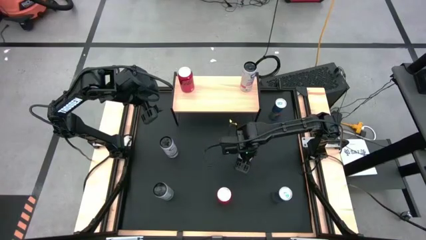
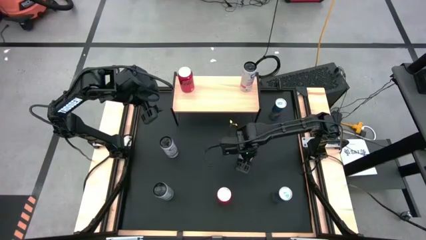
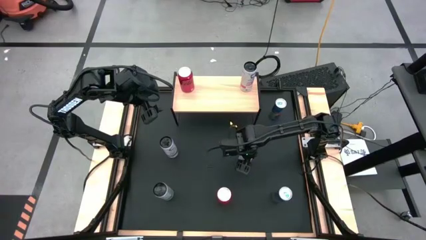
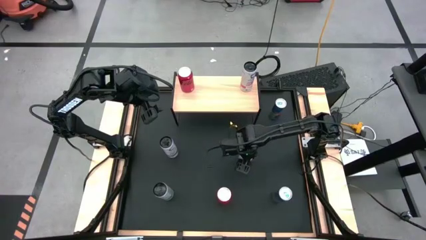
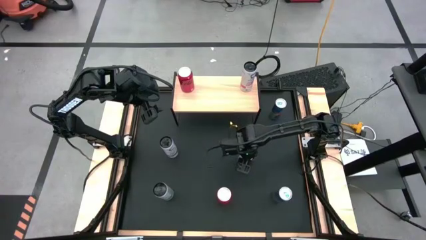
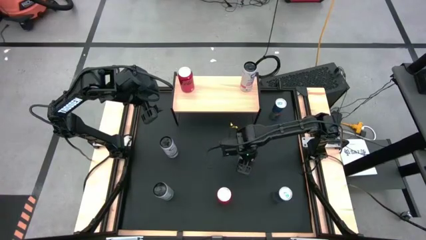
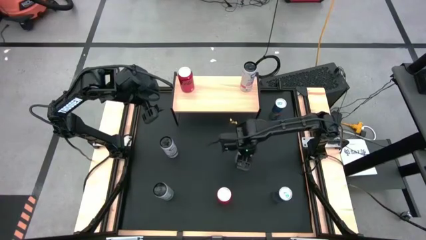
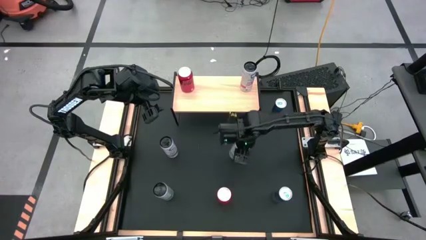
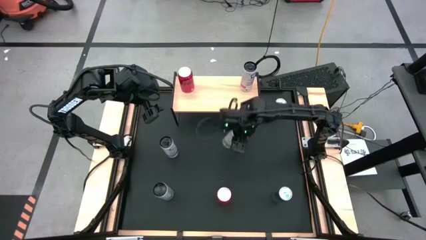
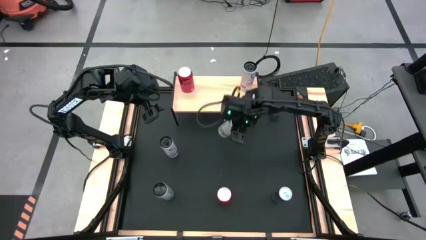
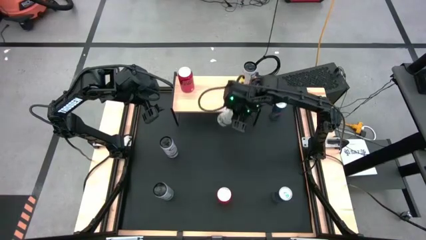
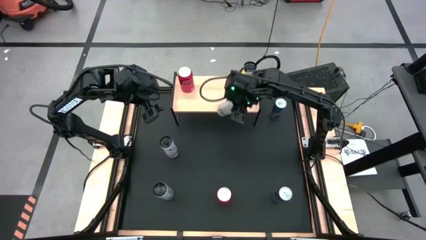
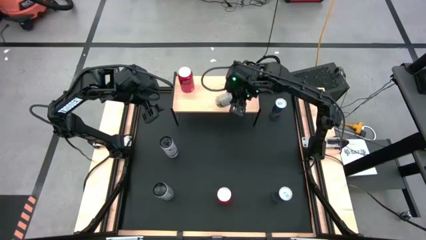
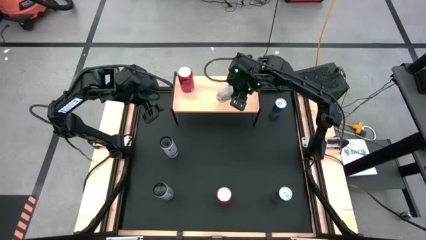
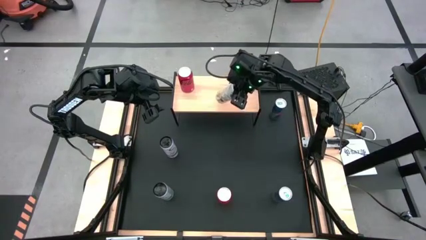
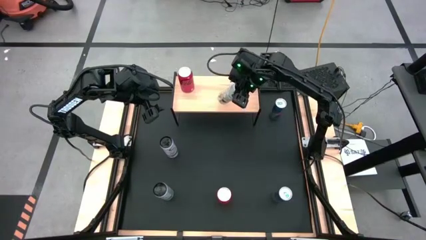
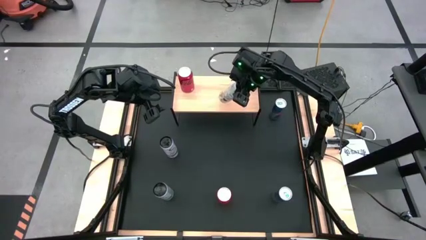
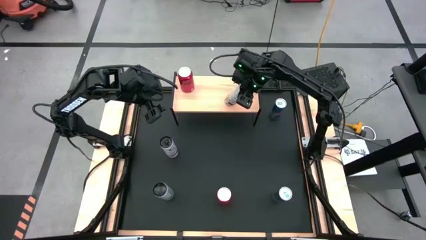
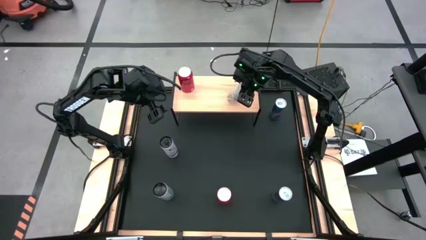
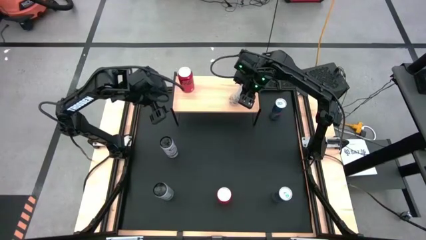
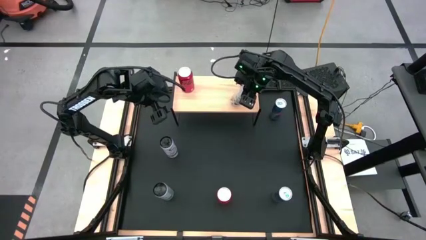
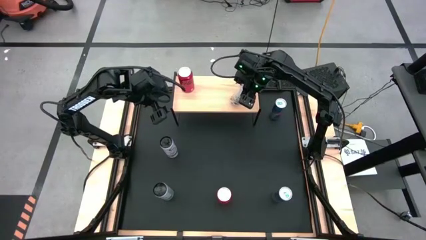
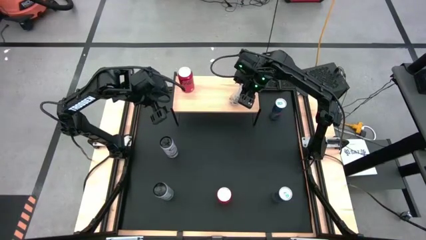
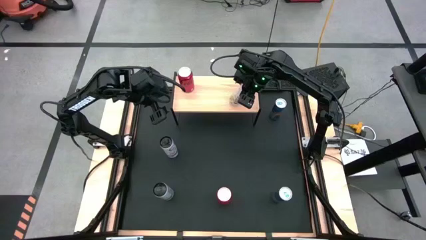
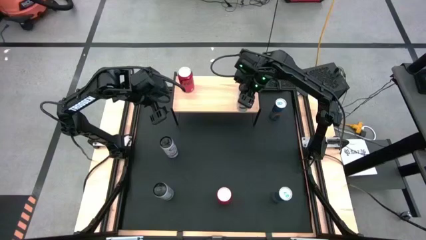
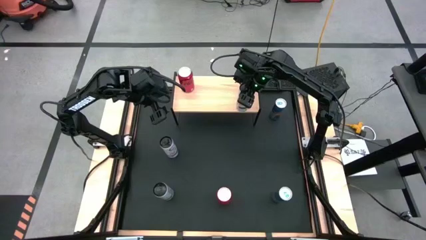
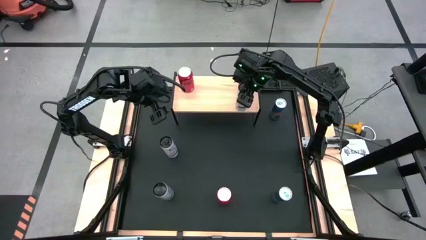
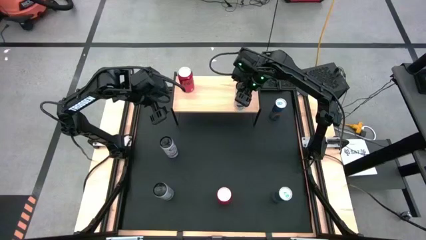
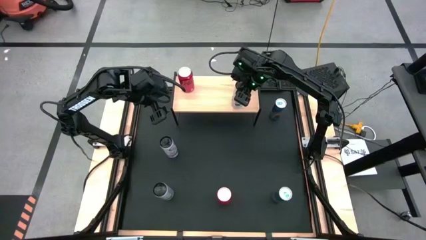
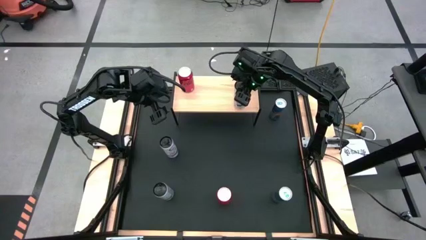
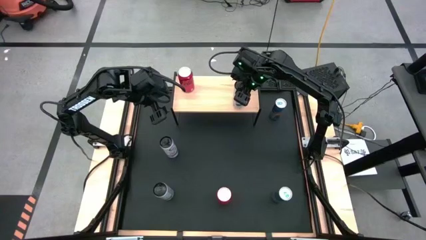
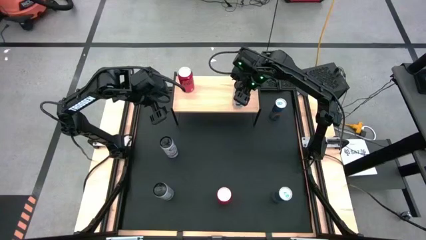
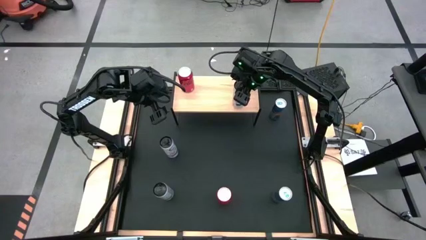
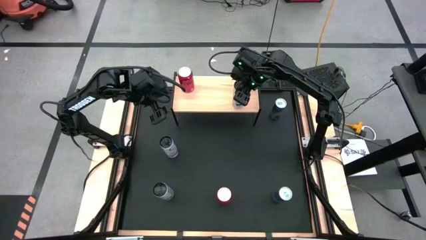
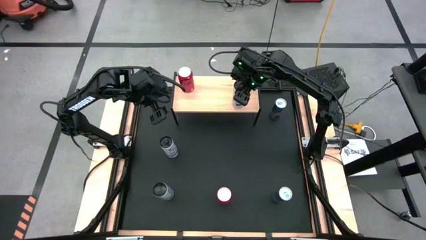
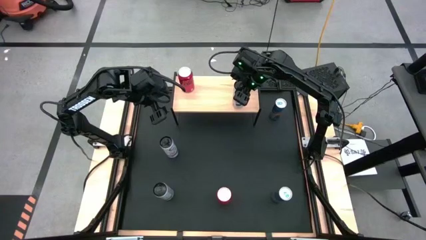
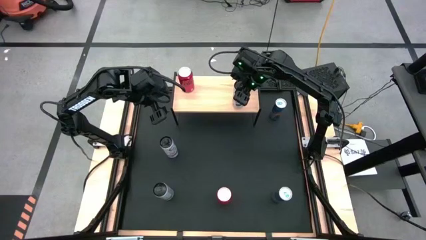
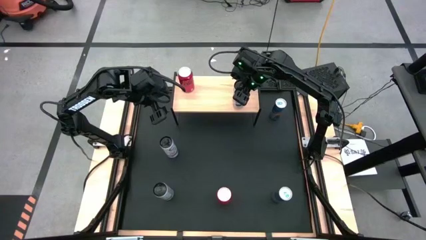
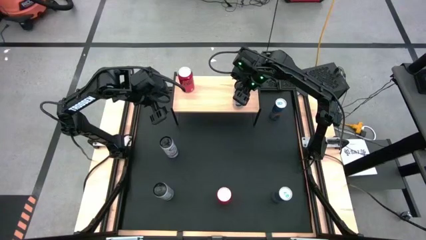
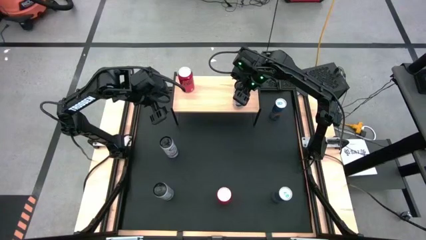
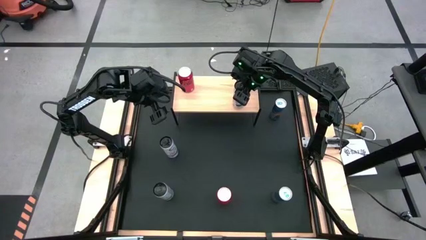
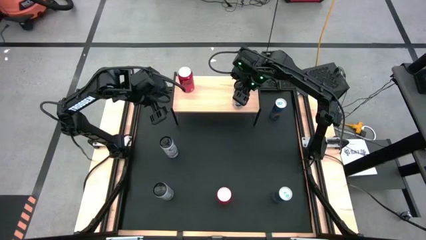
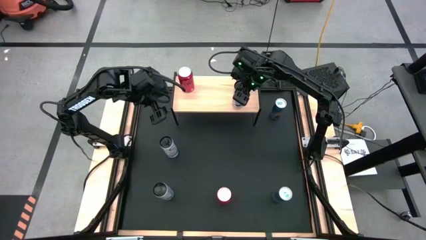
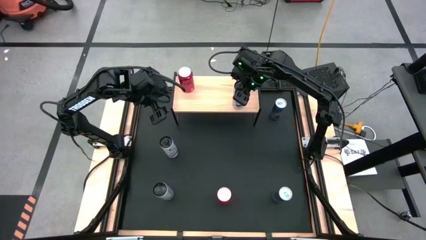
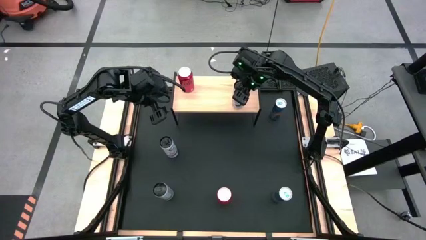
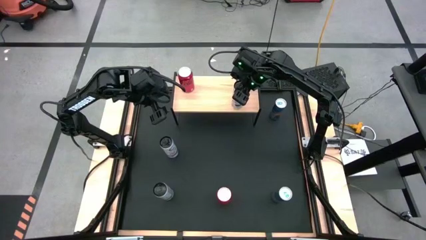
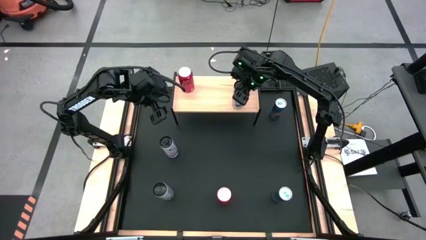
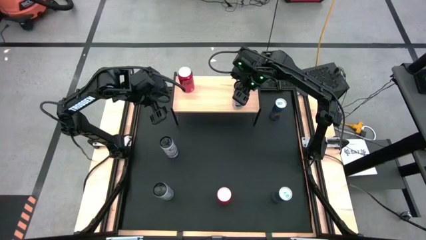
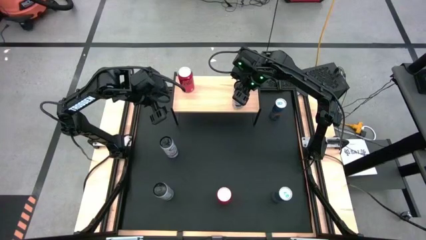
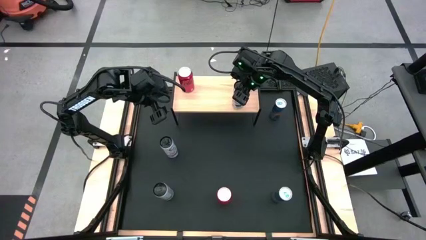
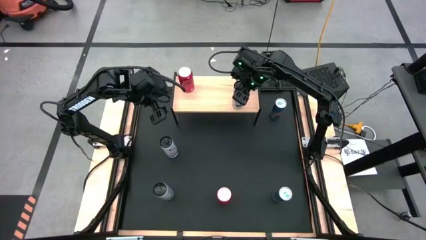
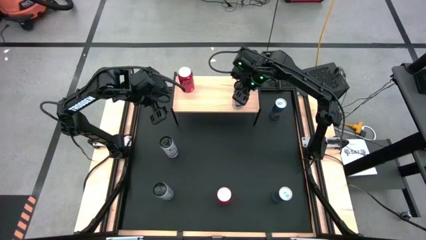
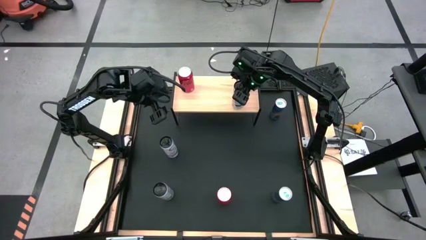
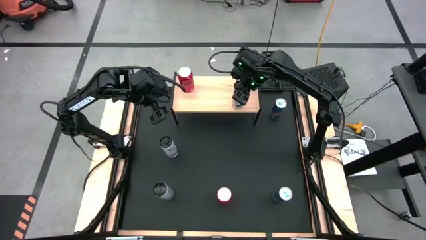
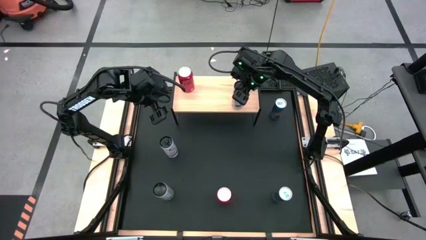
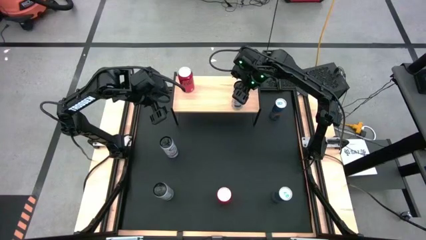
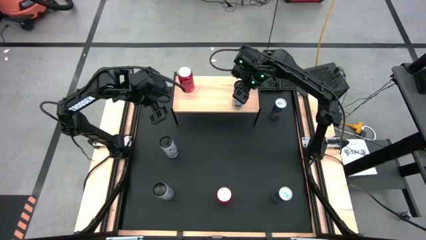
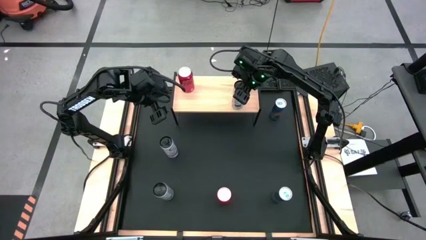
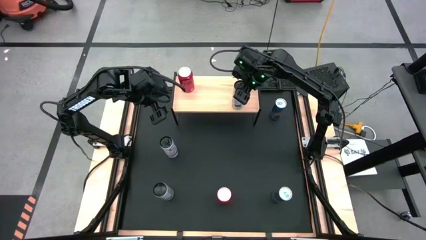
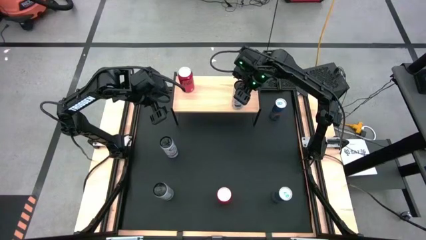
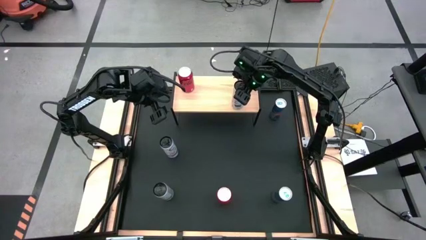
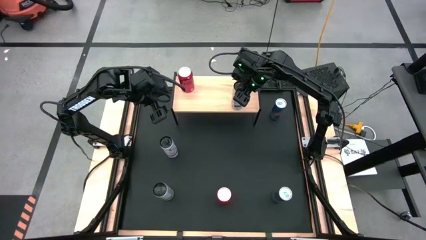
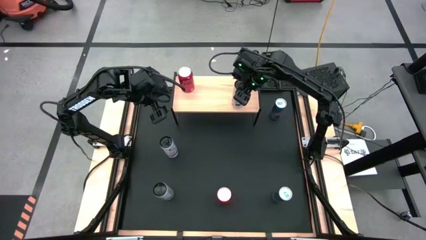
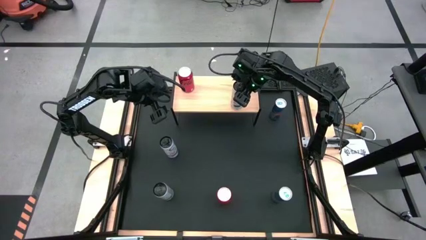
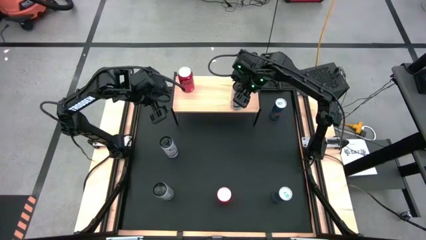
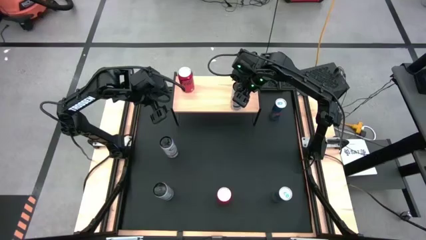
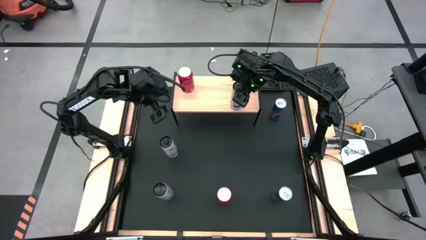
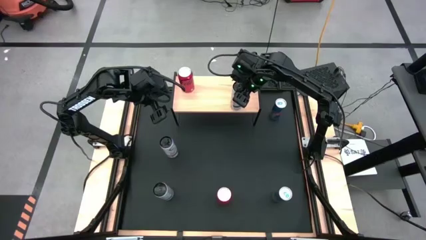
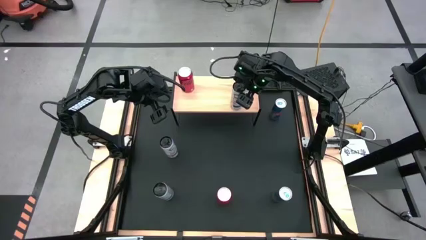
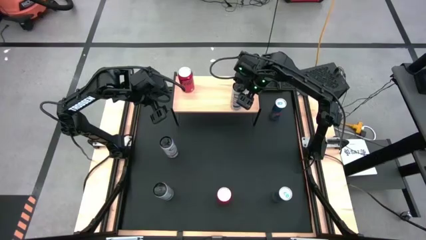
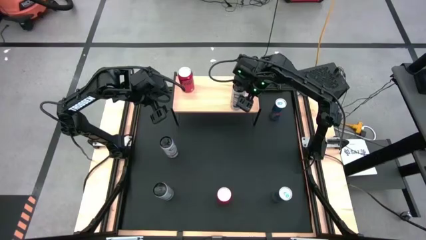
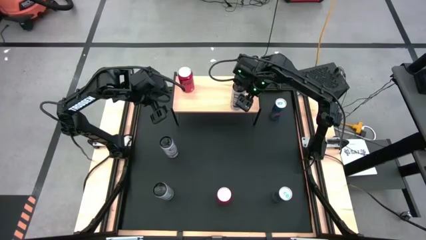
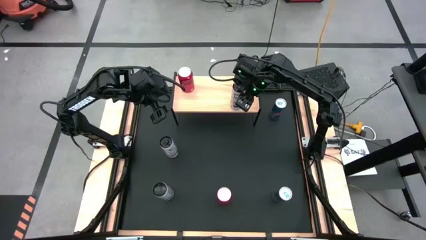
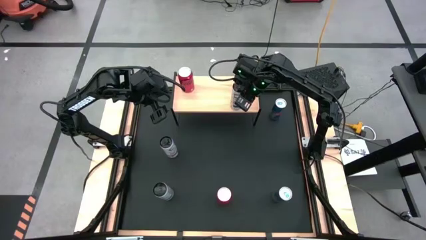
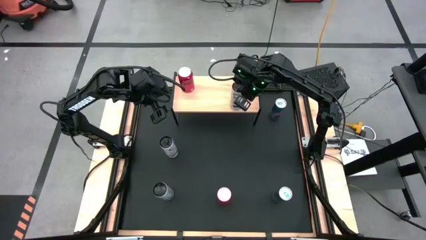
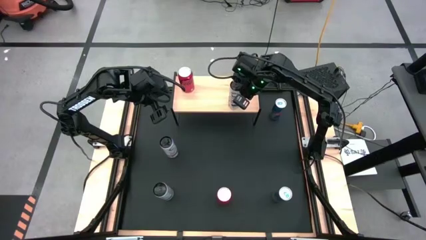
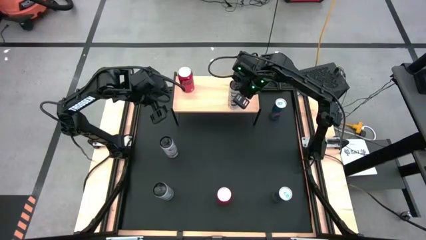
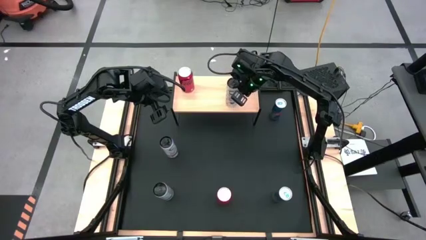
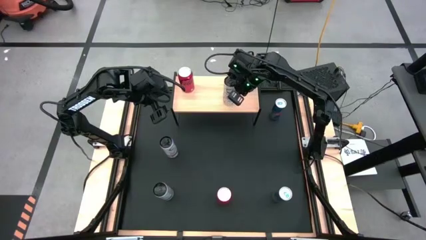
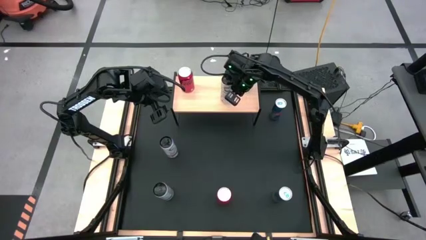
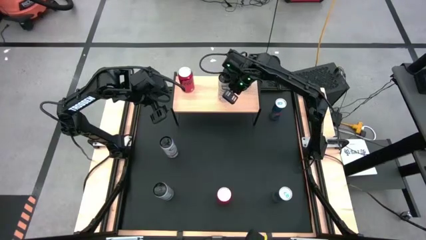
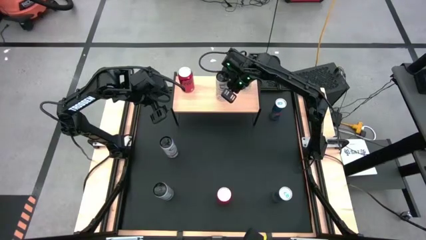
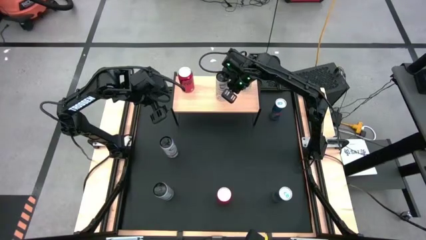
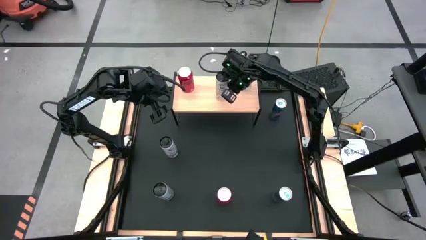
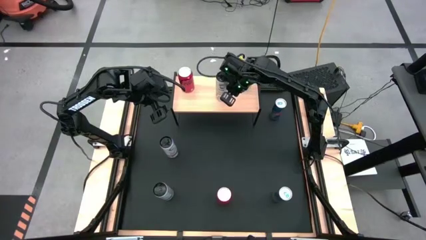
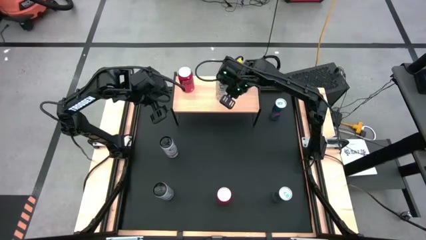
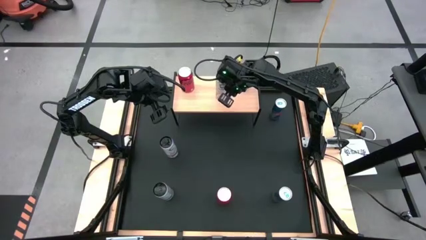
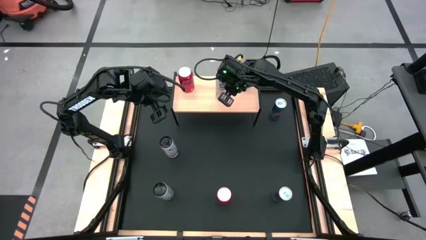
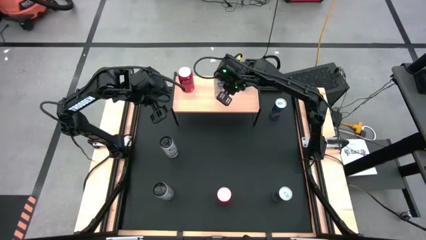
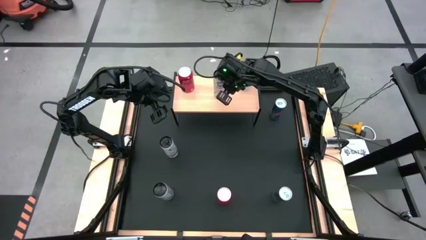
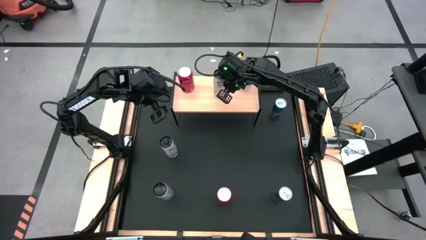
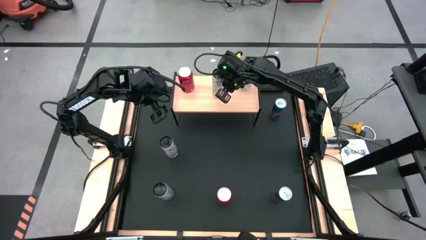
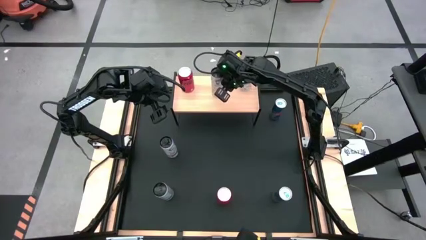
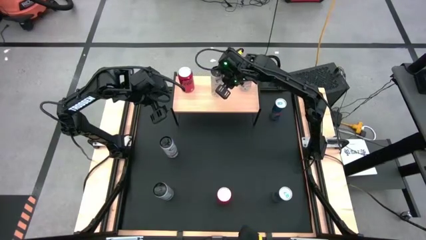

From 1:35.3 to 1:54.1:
Task: Place canned beverage on shelf
Put the top white yellow soda can on the shelf
